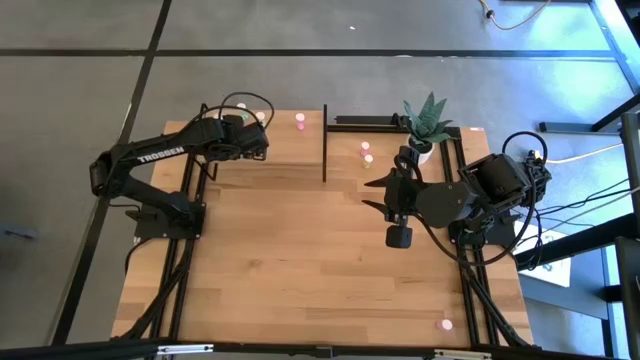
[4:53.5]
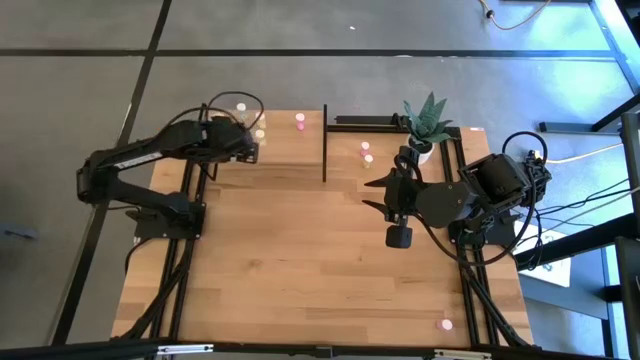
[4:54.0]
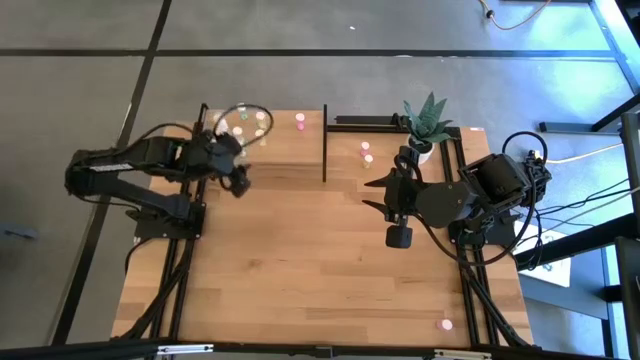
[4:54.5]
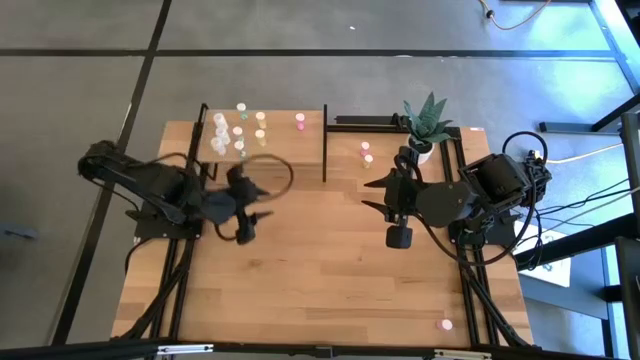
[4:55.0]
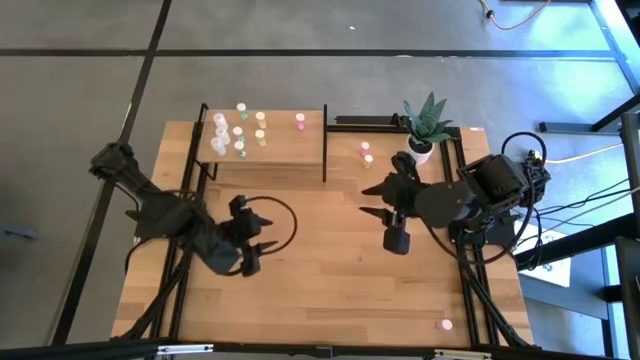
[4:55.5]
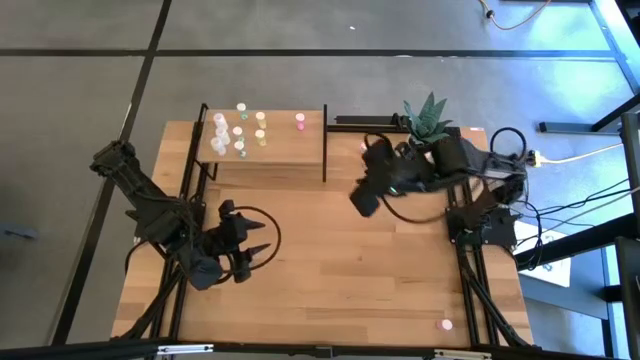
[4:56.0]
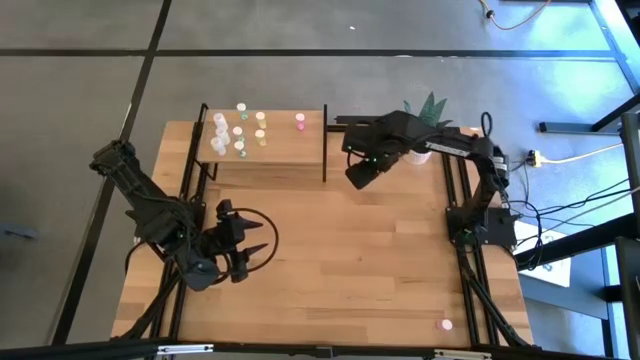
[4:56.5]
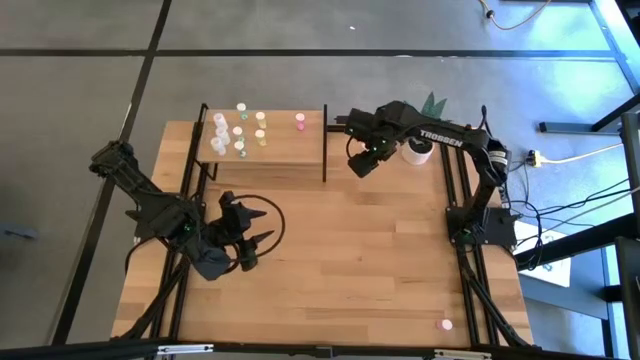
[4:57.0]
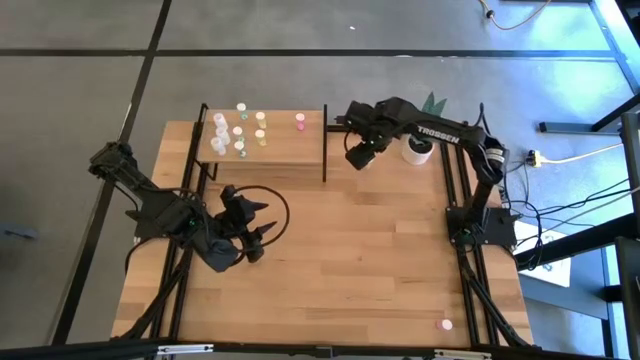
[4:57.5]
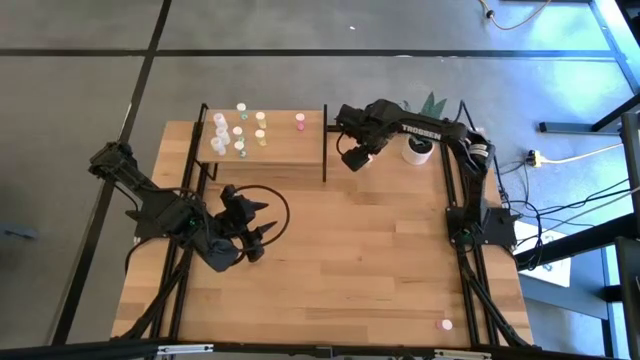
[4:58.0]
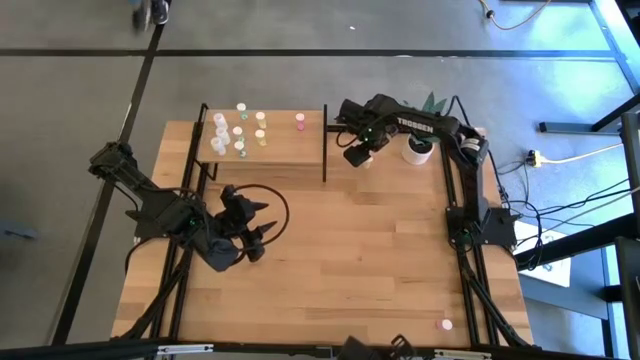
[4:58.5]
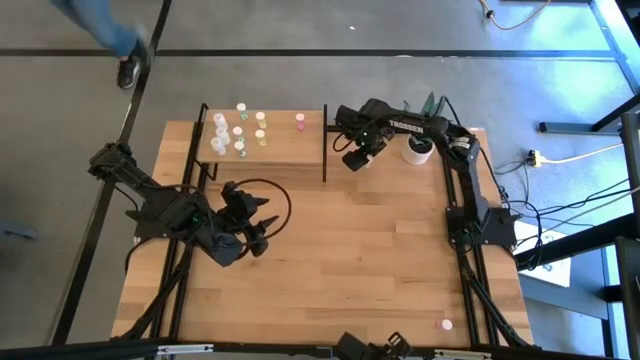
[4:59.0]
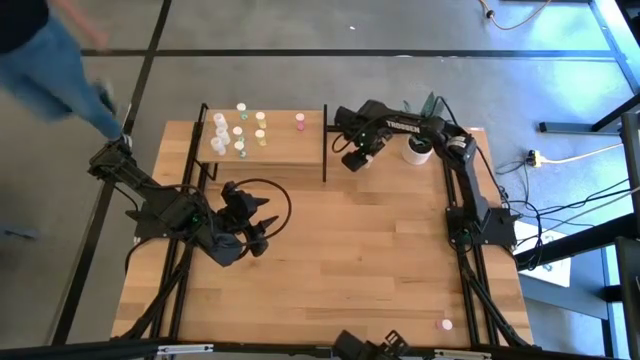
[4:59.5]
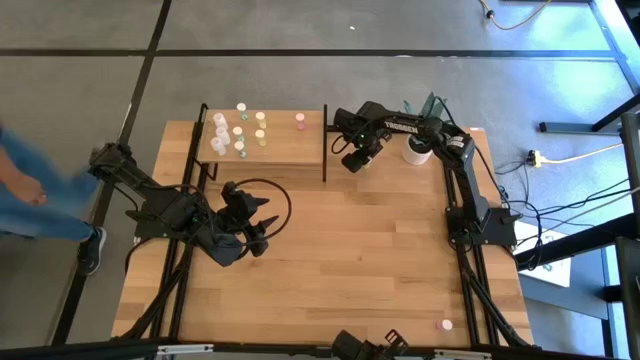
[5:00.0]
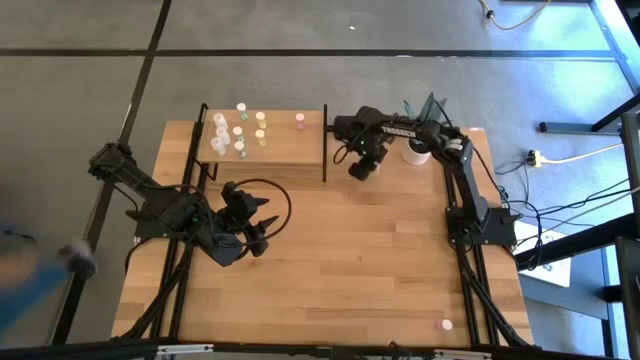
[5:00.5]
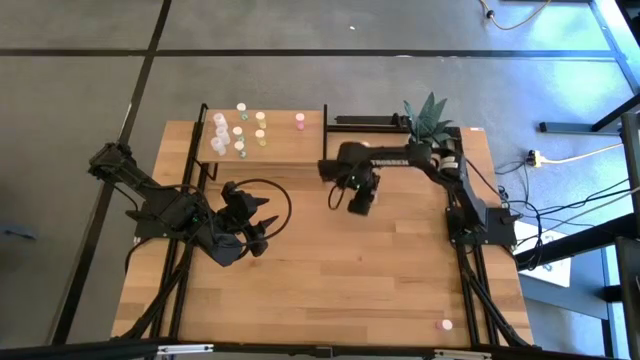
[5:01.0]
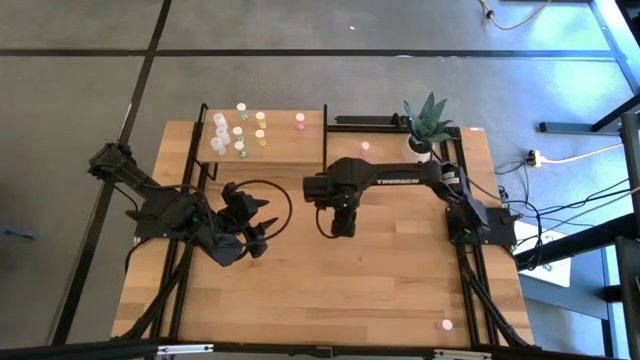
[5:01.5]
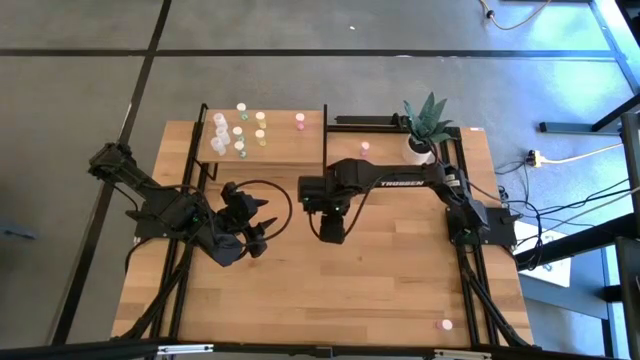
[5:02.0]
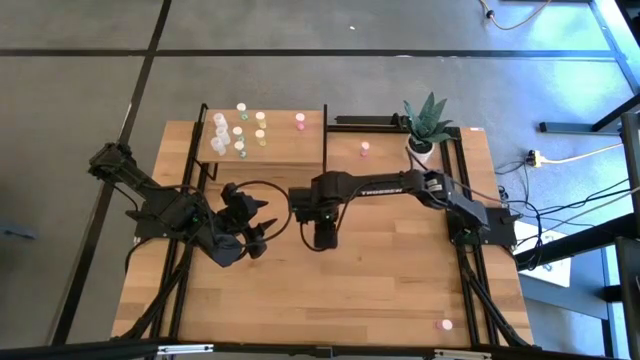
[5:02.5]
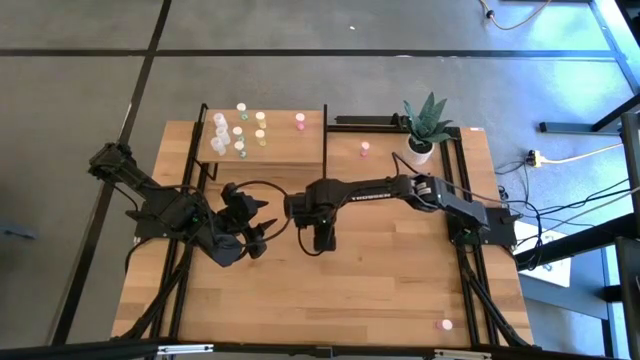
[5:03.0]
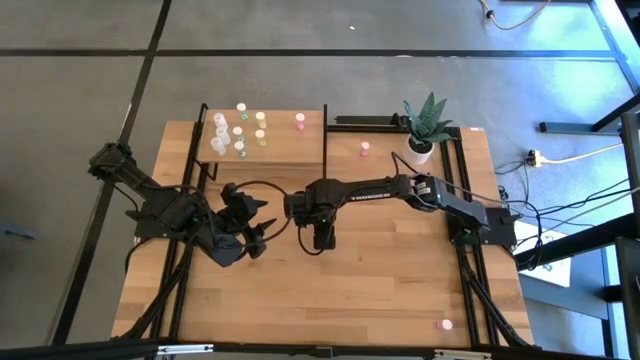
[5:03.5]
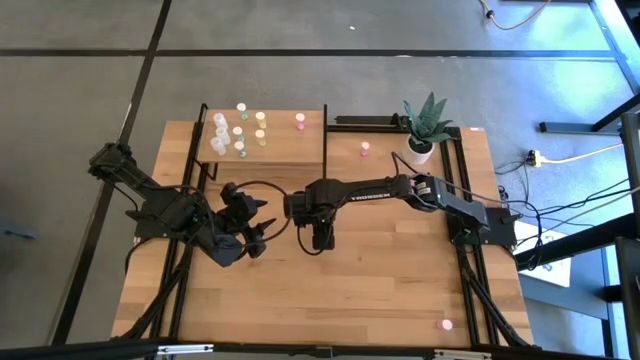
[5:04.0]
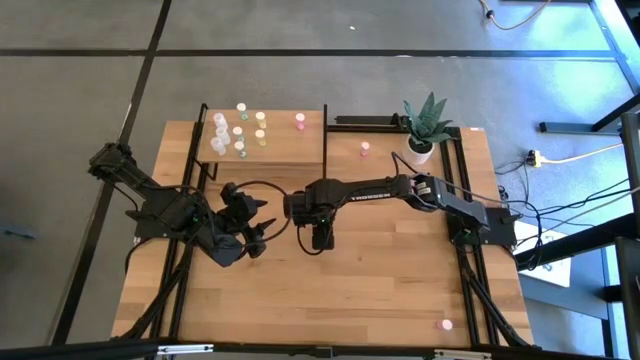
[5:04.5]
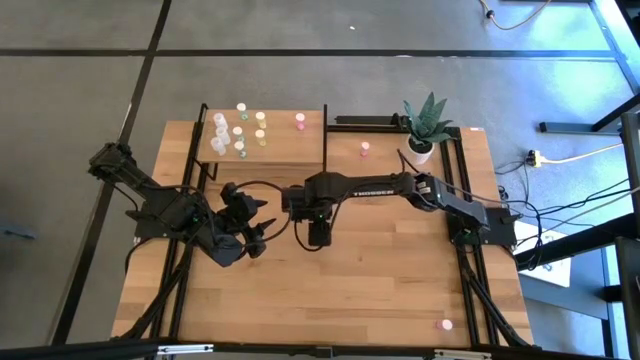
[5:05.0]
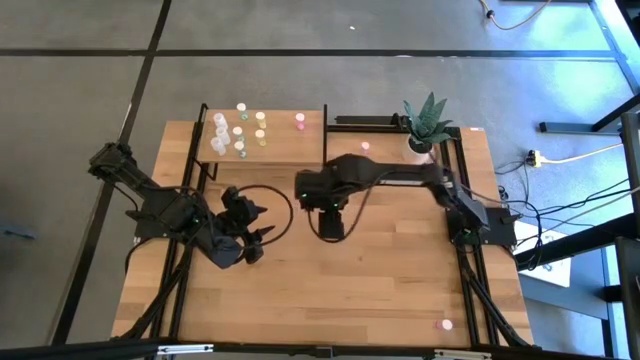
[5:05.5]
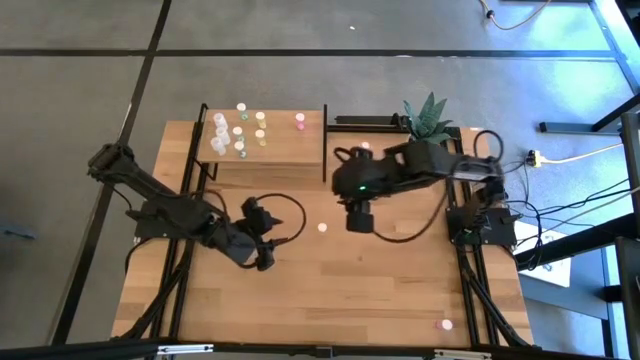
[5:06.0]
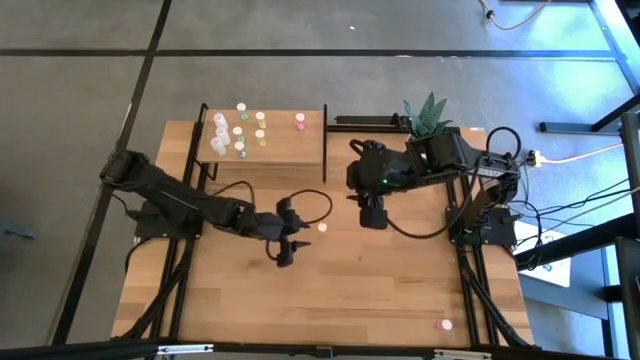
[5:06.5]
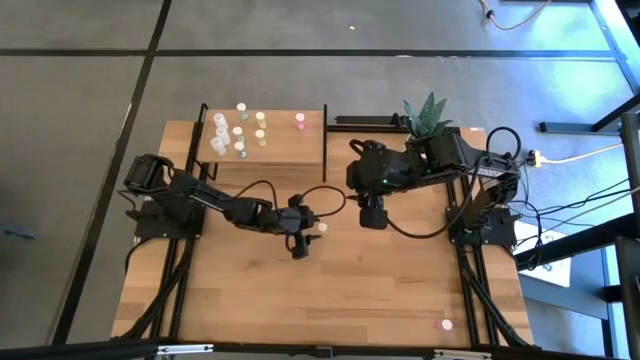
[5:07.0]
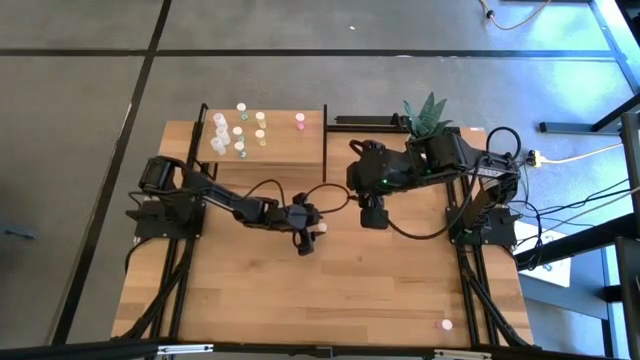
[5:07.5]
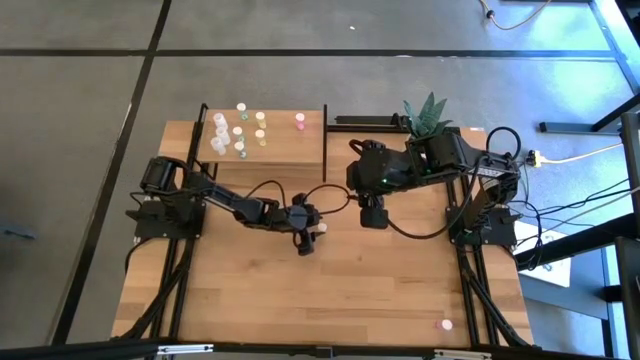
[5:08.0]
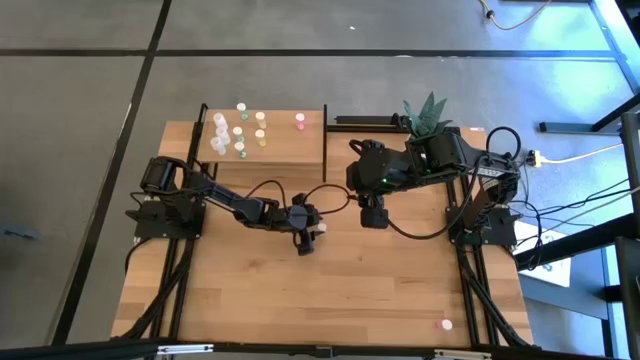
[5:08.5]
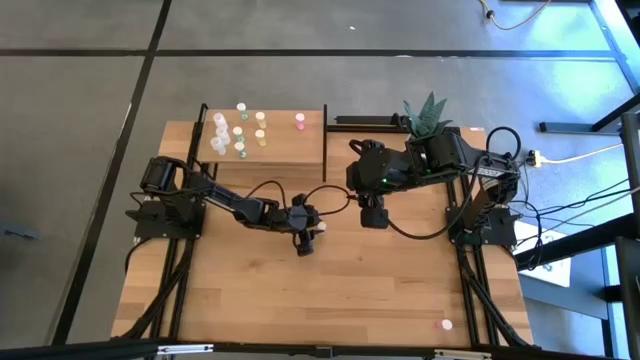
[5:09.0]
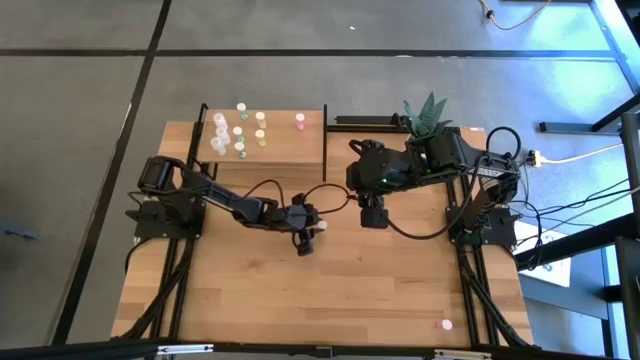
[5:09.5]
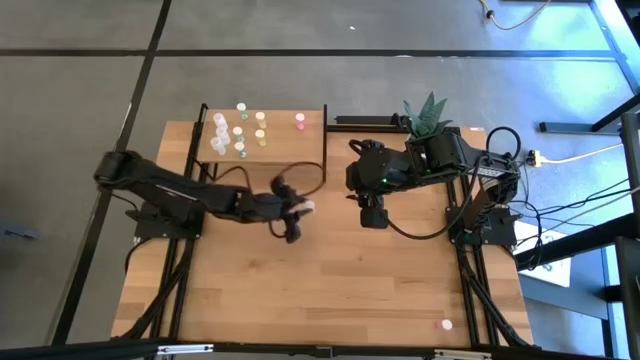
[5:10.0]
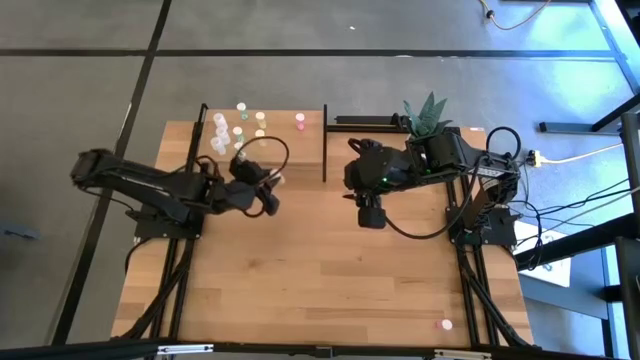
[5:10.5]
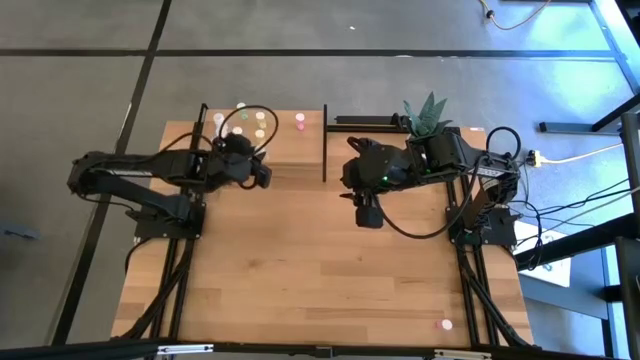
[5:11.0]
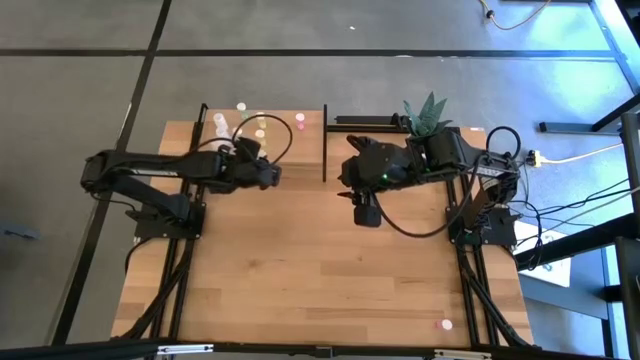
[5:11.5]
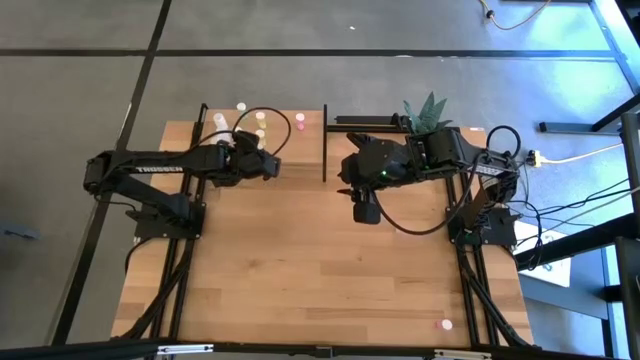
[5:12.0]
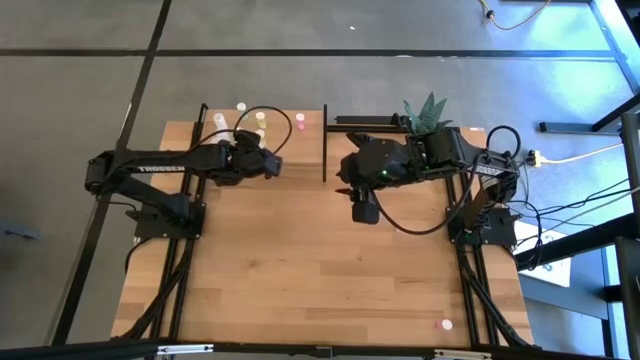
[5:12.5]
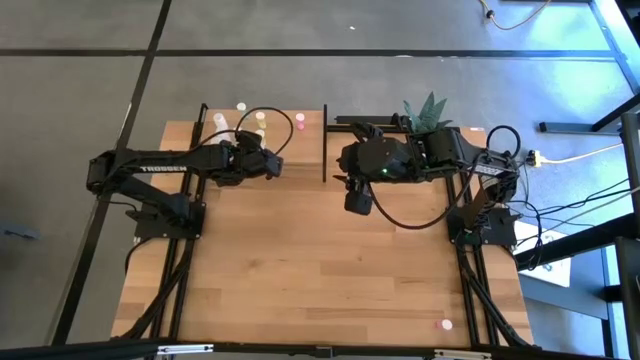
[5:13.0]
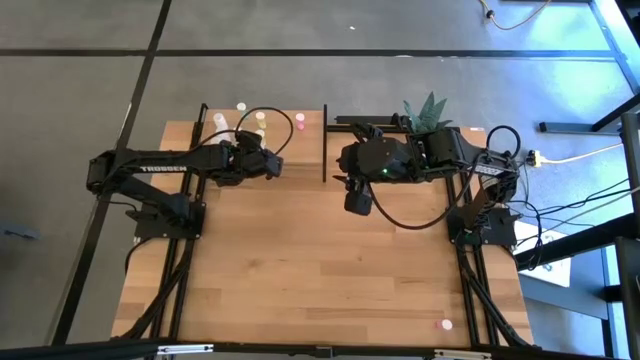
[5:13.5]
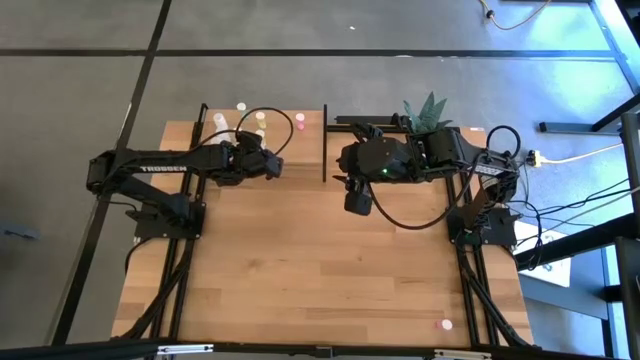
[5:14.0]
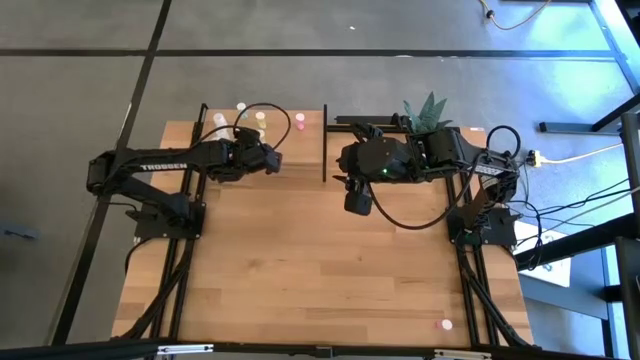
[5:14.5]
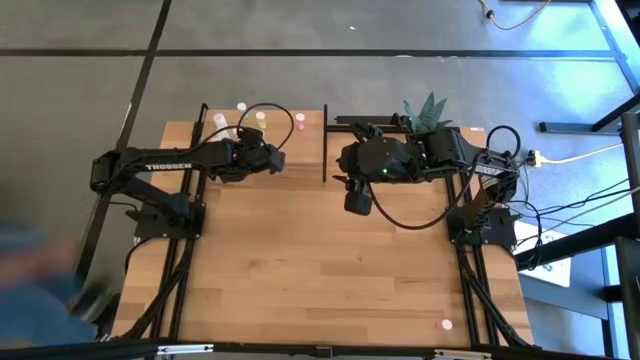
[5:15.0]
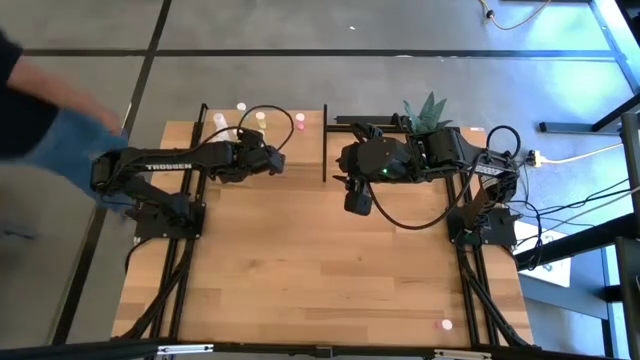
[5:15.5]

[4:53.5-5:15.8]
Task: Pick and place medicine bottles onto shelf by color
Put the yellow pill bottle aligned with the other yellow pill bottle on the shelf
